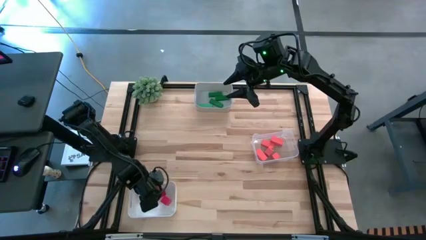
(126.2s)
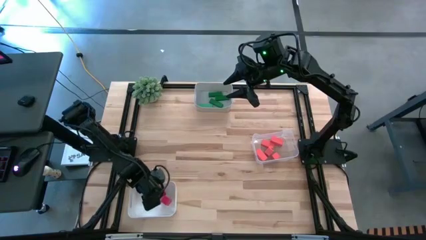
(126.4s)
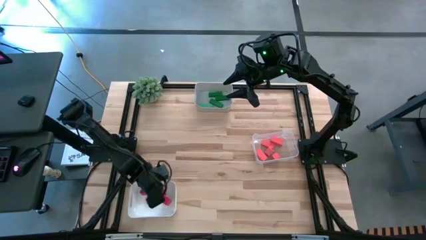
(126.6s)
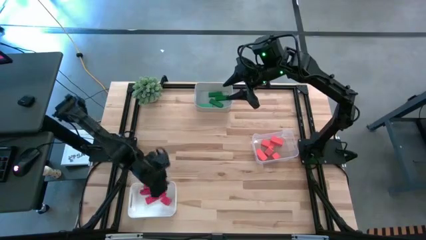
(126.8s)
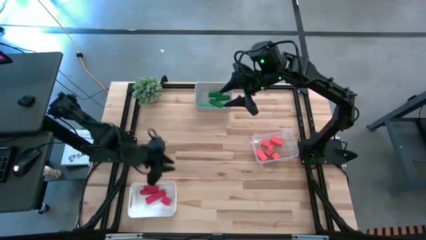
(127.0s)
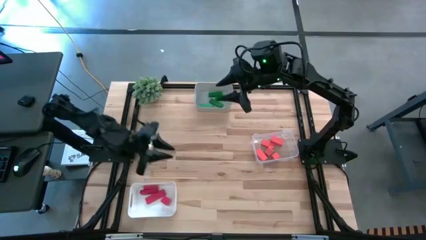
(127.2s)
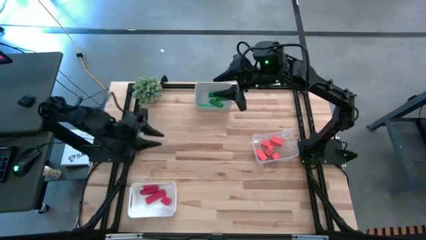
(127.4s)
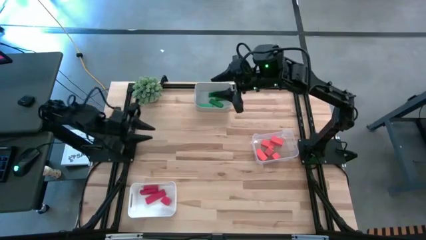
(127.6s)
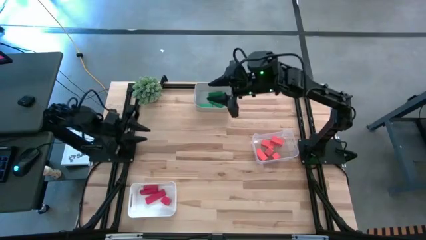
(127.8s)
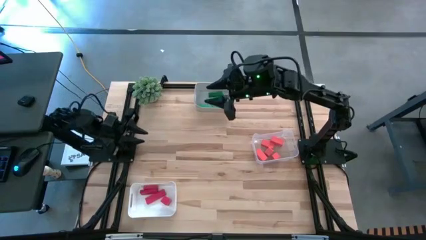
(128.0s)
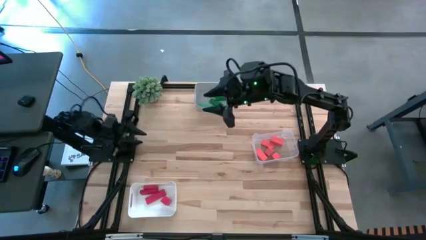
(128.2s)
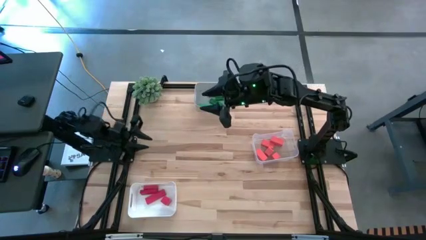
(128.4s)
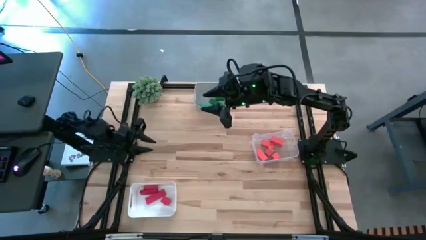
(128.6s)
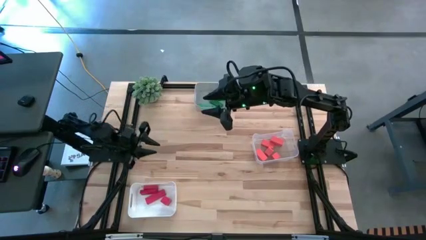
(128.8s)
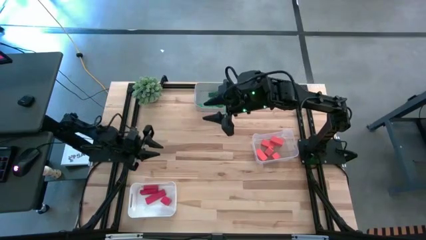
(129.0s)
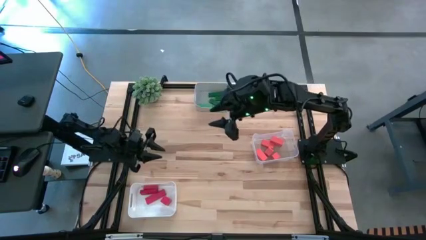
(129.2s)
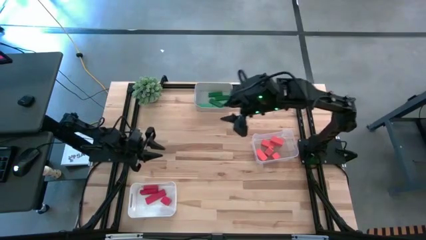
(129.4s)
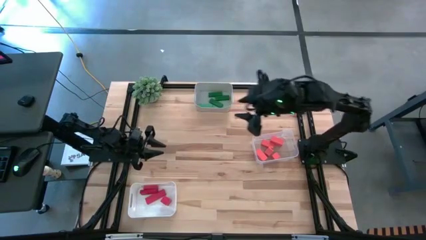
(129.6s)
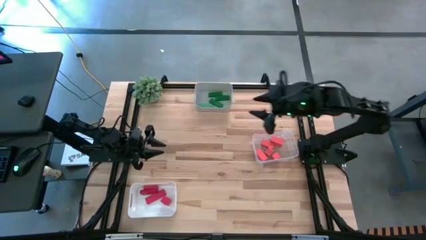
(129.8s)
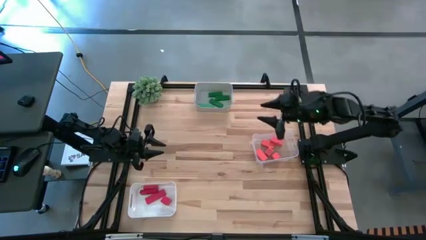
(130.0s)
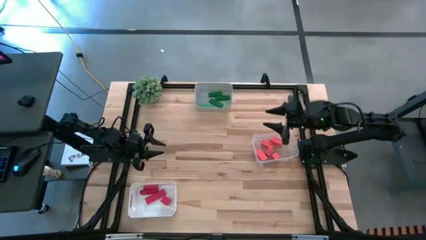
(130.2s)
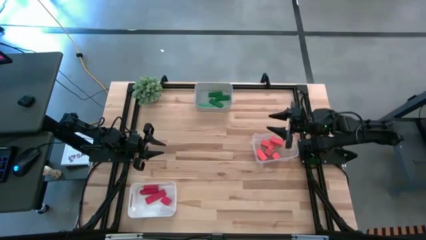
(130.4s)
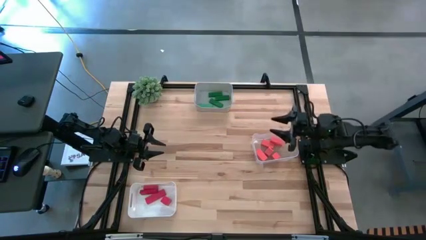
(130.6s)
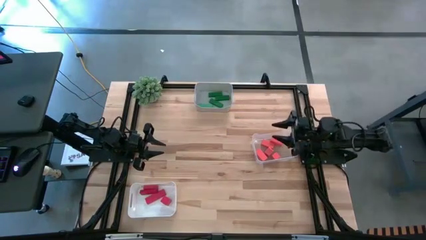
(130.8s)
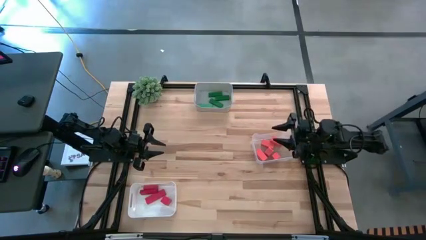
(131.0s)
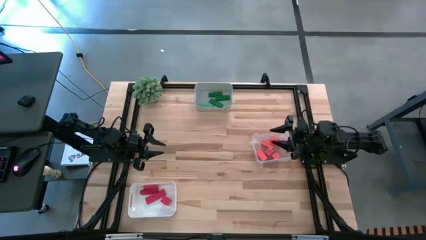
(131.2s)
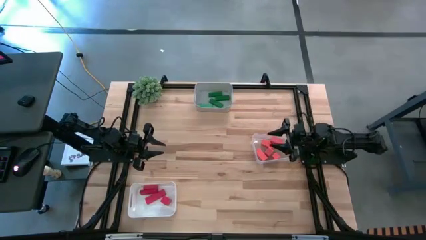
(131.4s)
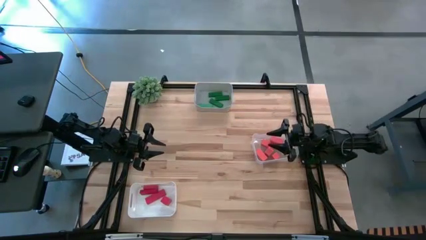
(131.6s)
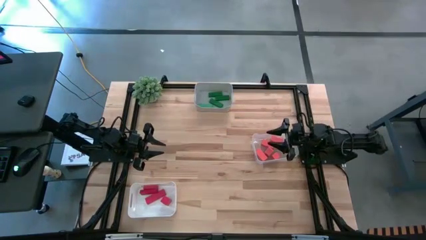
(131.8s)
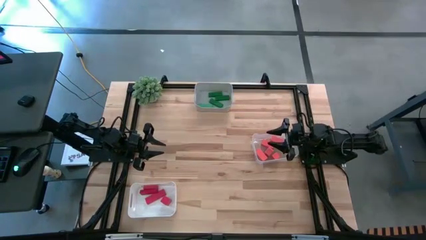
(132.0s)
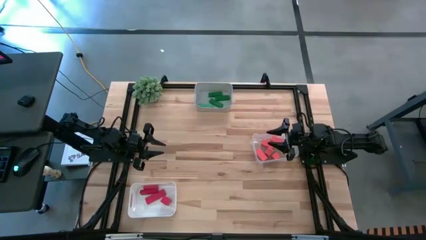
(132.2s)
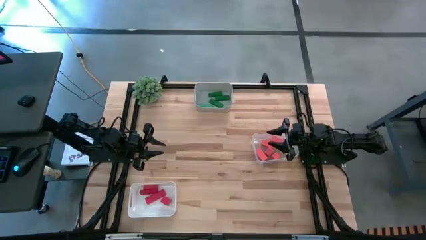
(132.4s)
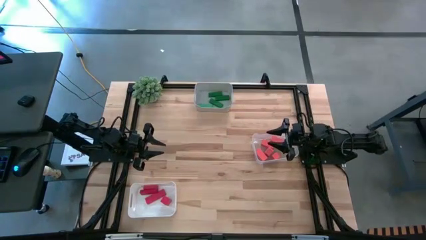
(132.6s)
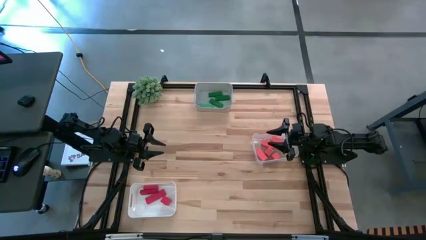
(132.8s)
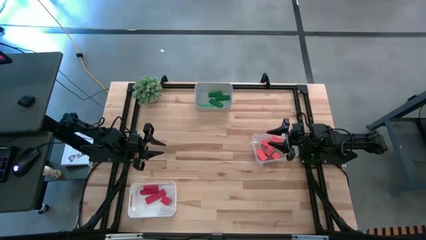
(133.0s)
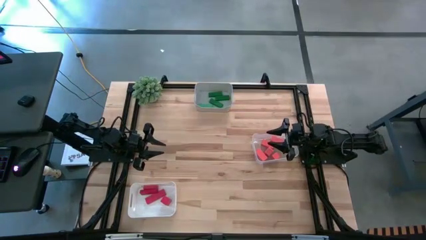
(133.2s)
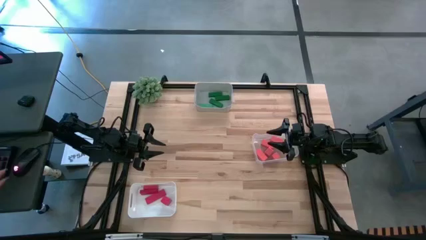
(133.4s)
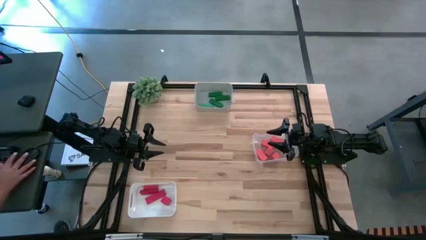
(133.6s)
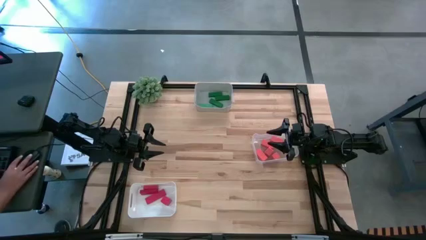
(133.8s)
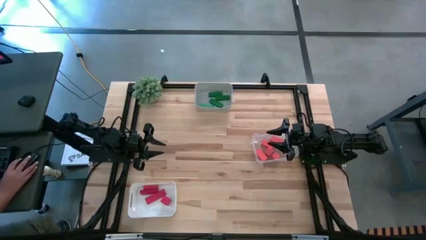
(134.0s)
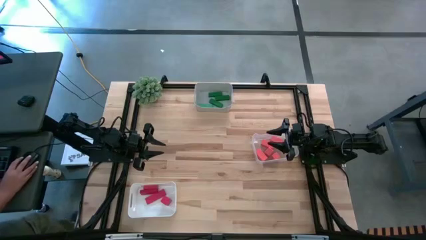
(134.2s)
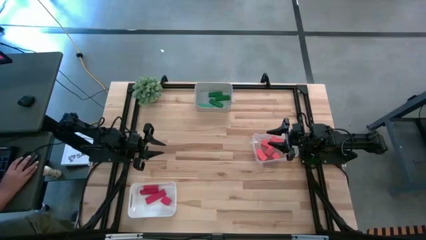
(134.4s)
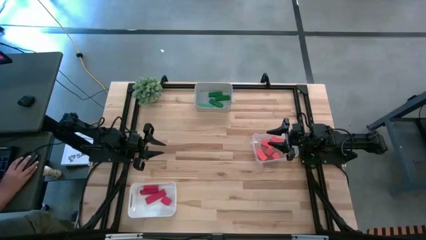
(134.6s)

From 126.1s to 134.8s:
Task: Sort & place blocks by color
Return to Home Position

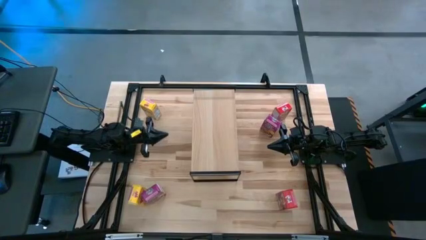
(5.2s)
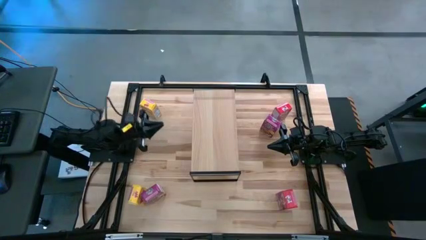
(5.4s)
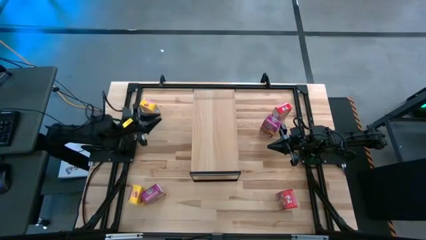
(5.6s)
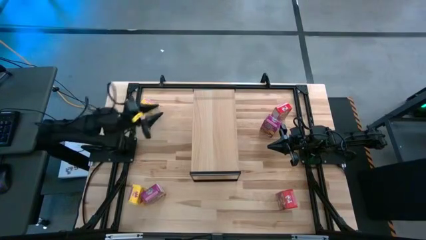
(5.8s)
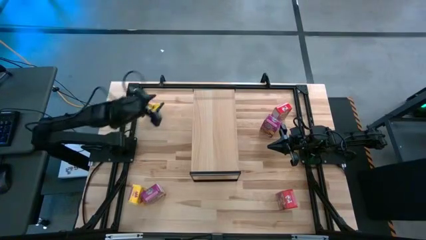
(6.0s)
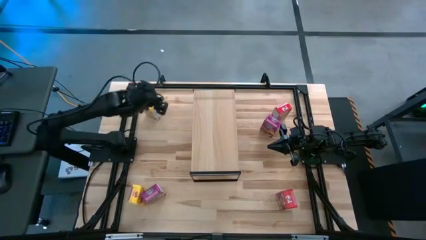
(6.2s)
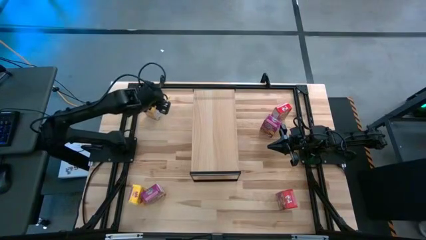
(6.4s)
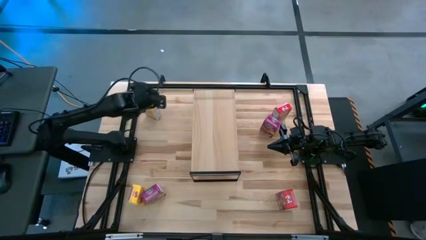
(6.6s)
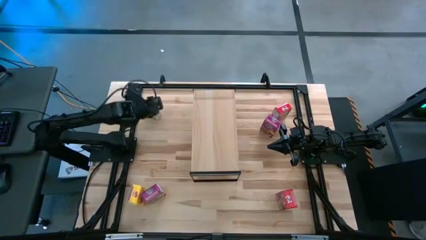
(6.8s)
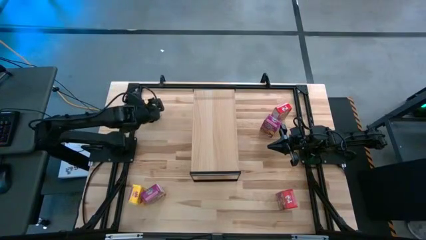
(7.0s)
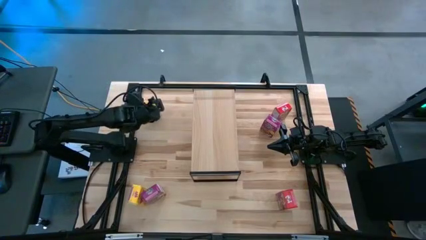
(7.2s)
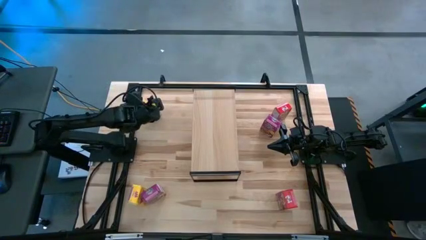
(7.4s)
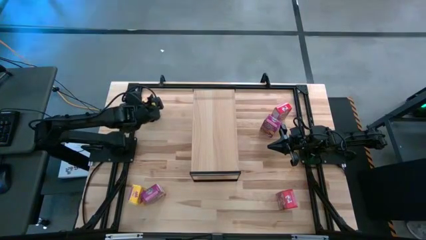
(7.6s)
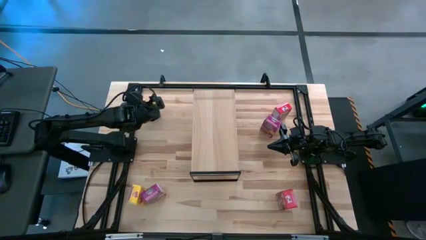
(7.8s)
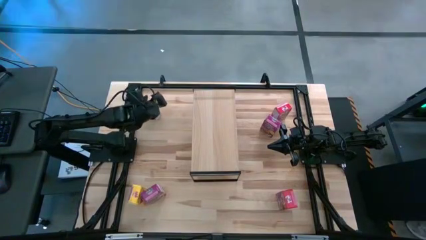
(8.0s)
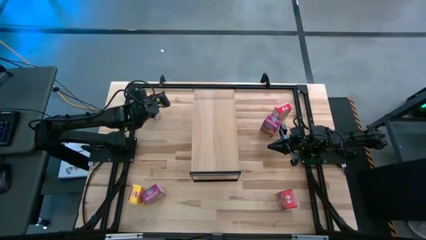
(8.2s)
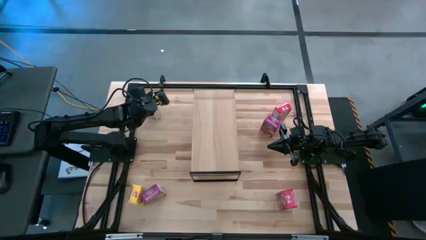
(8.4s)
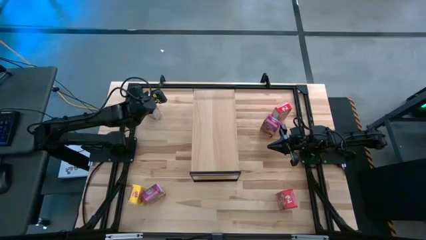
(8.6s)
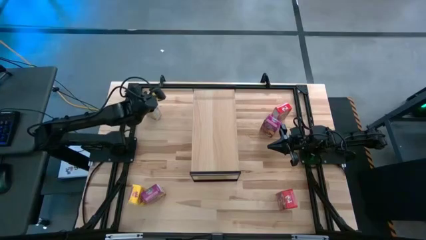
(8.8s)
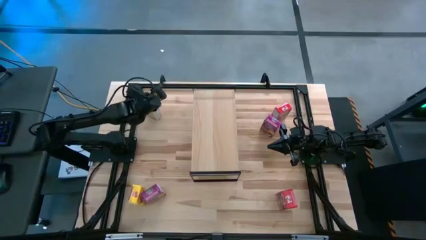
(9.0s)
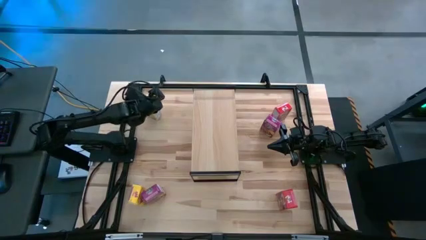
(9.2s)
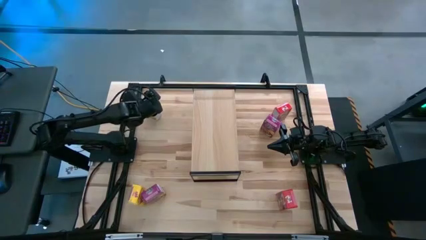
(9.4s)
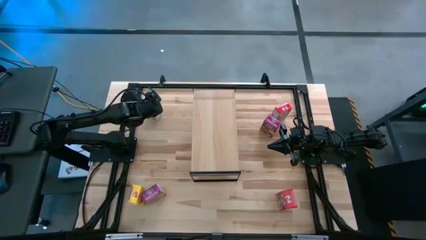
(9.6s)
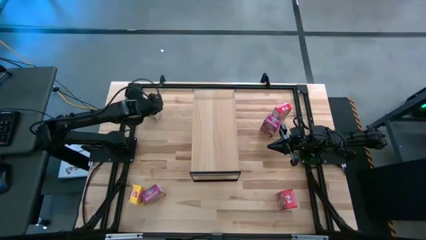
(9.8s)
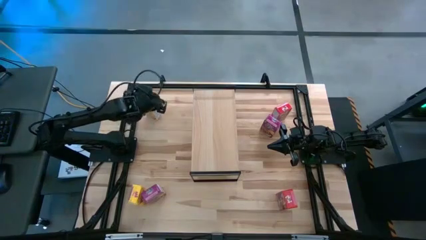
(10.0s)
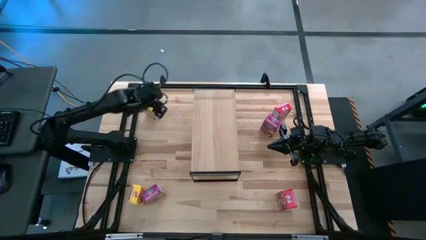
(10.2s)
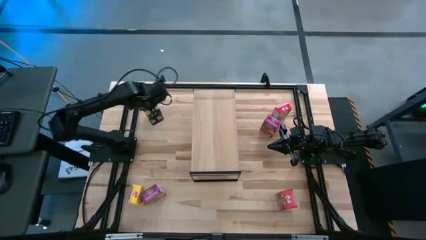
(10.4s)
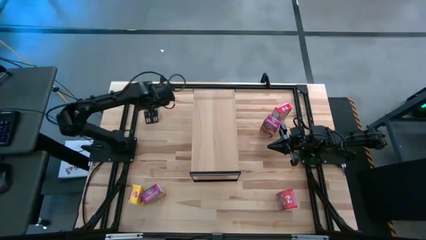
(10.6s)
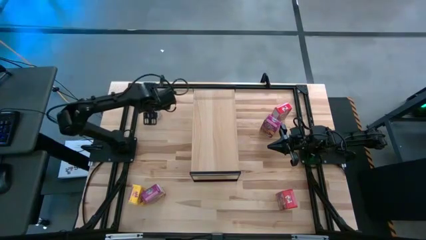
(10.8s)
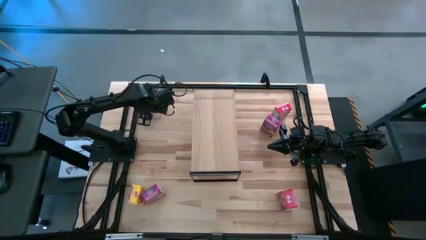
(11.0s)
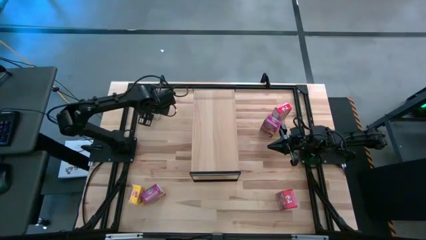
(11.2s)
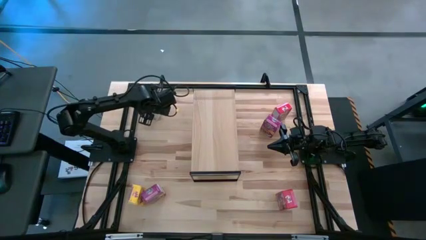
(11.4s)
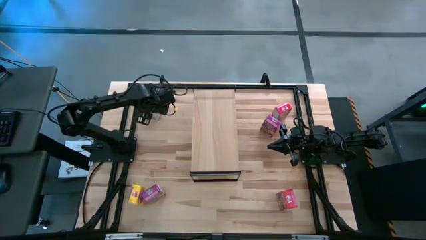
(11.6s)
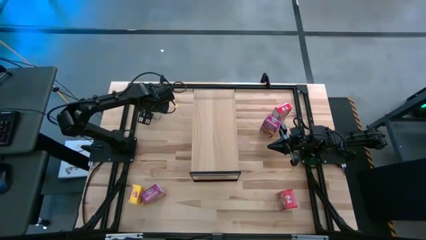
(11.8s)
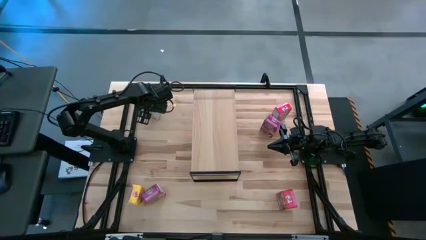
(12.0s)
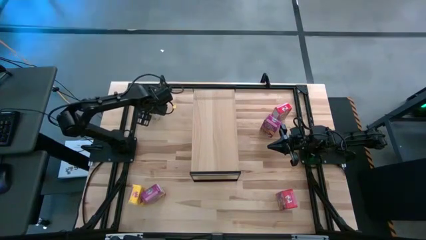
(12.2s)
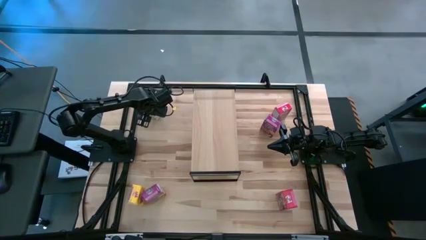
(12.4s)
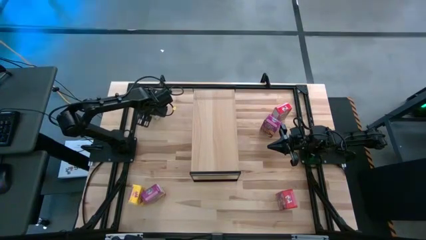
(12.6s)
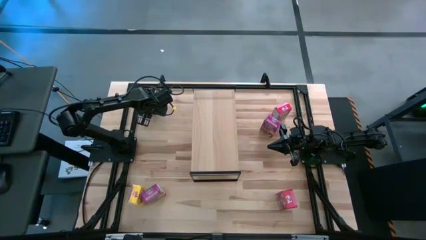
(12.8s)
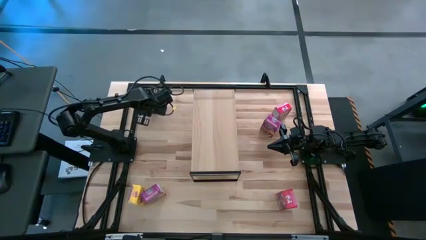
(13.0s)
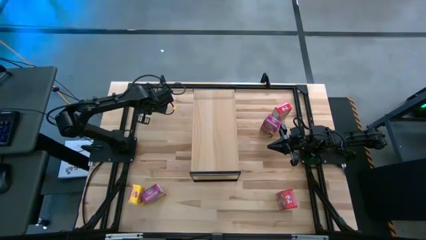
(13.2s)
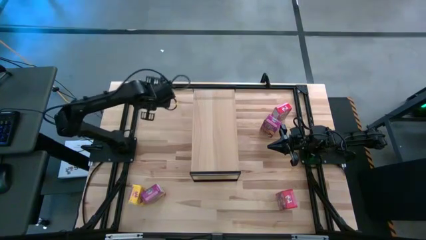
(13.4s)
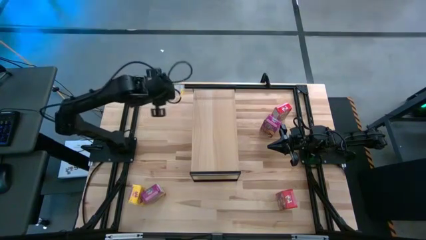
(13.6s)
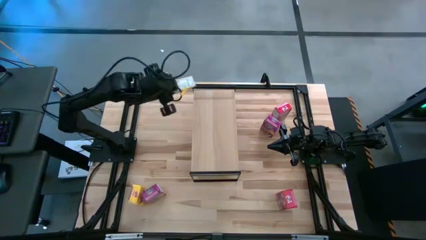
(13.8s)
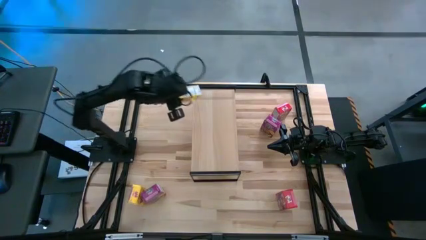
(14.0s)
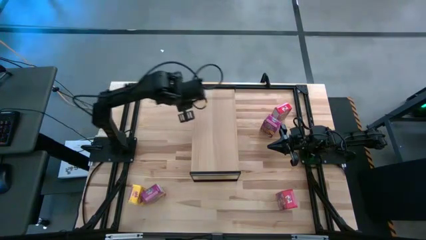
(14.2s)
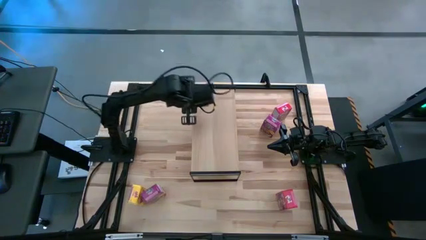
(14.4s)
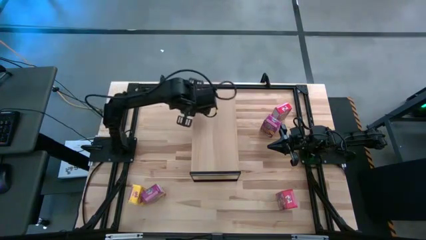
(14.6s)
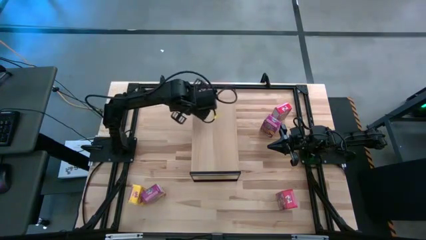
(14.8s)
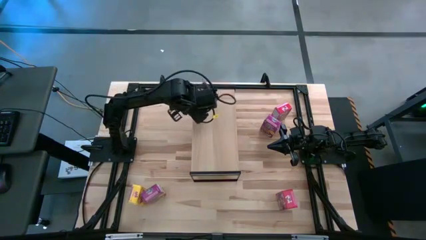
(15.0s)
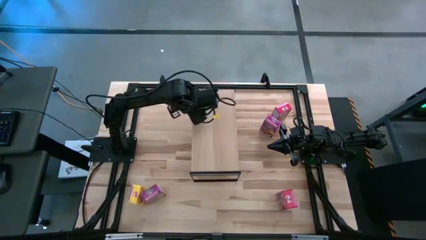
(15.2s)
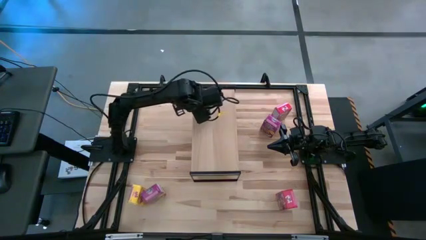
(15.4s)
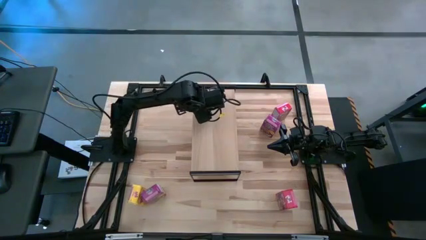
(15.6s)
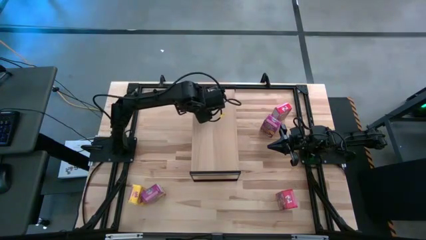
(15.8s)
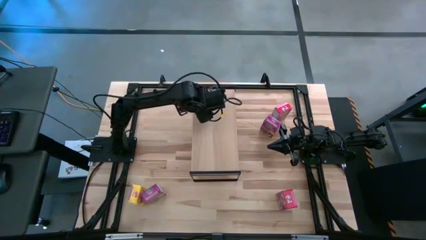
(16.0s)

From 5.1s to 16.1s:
Task: Stack cereal on shelf
Put the top yellow cereal box on the shelf
